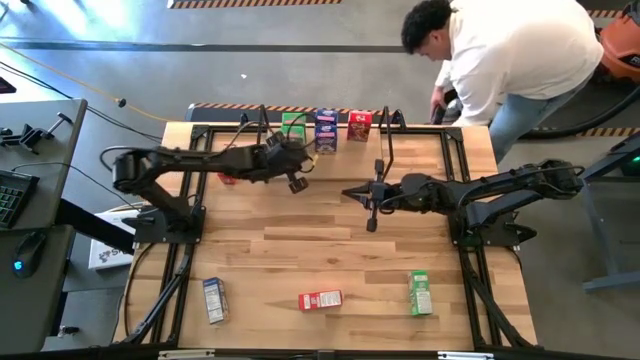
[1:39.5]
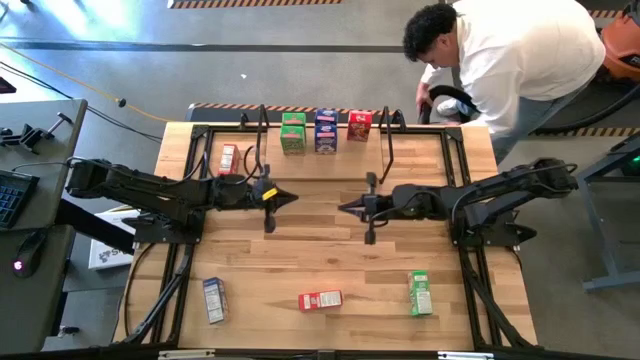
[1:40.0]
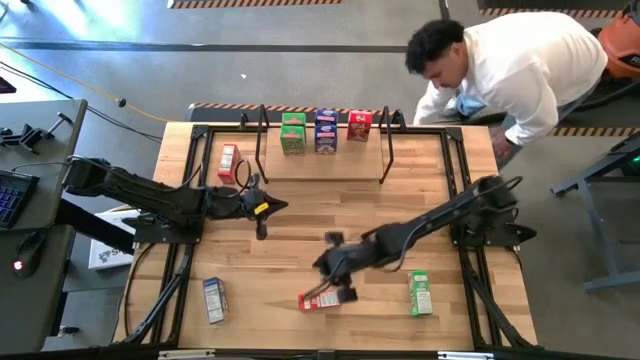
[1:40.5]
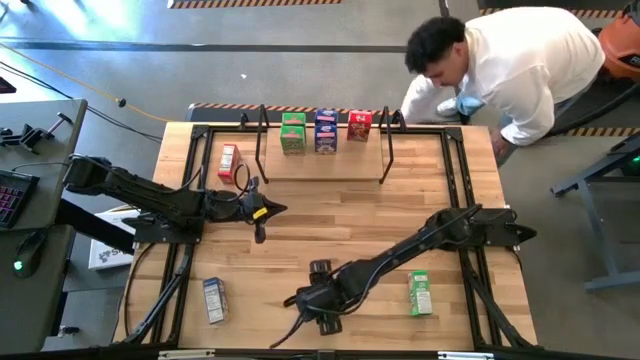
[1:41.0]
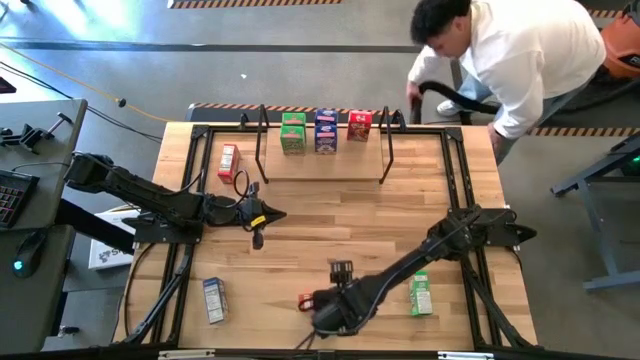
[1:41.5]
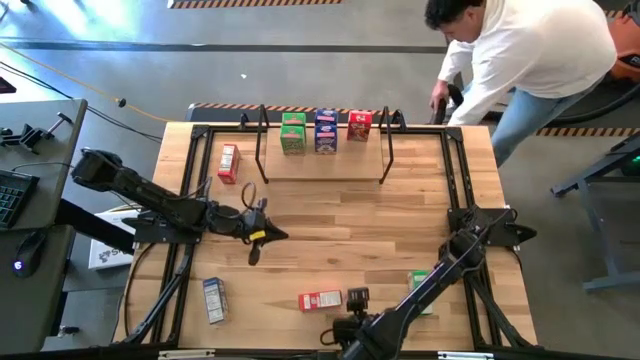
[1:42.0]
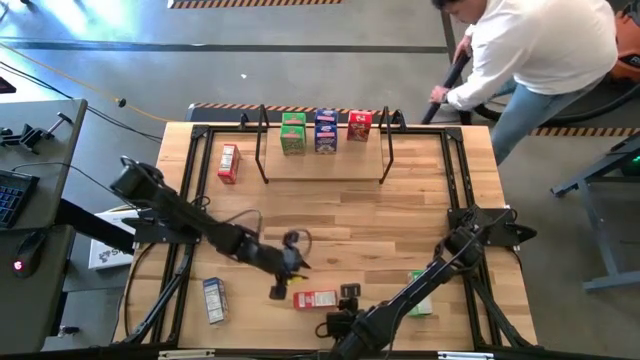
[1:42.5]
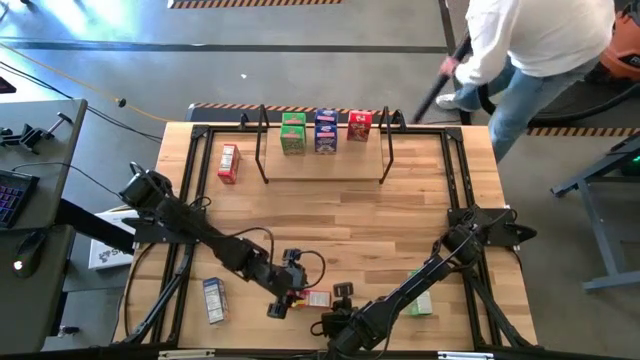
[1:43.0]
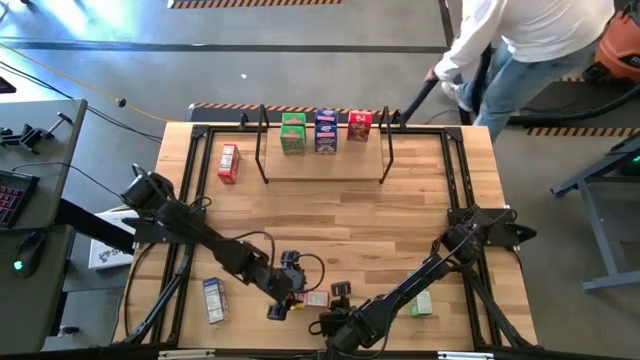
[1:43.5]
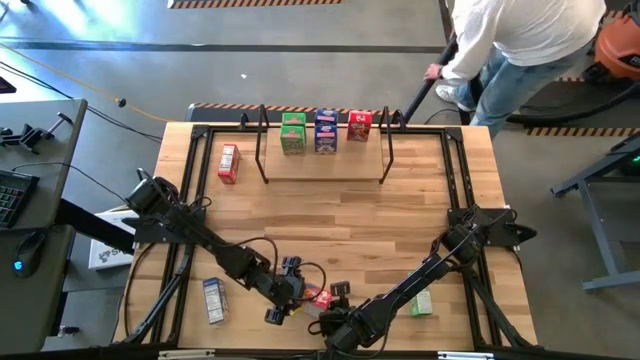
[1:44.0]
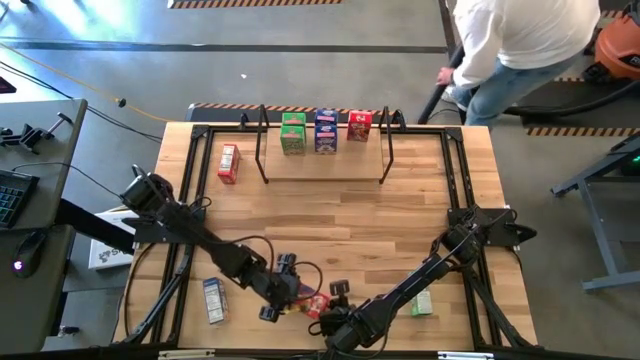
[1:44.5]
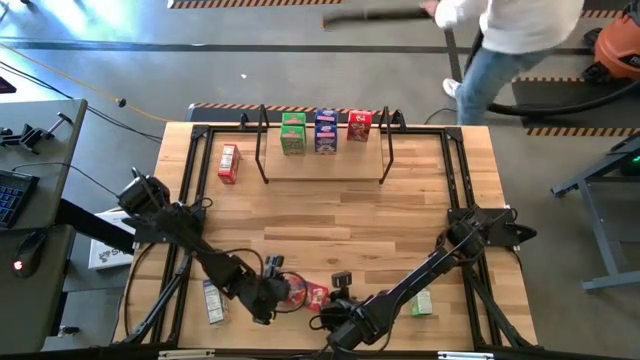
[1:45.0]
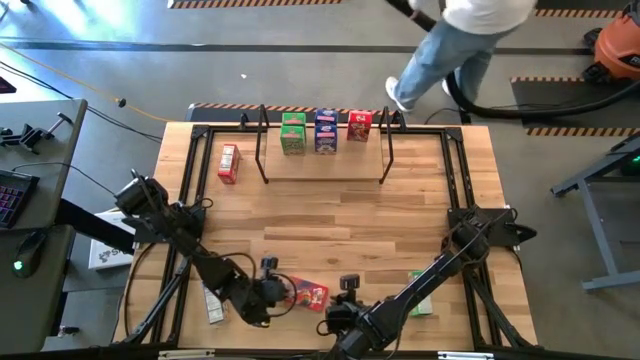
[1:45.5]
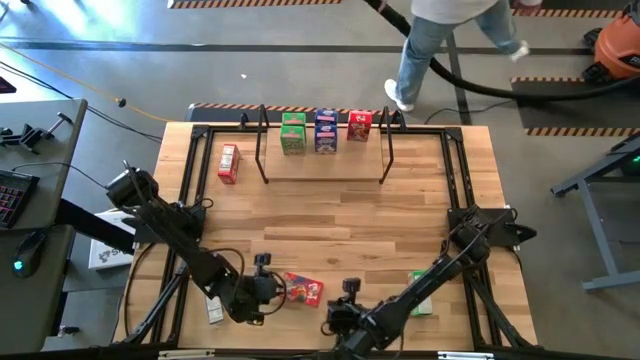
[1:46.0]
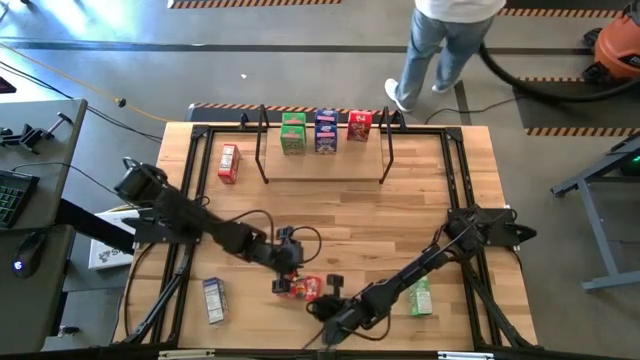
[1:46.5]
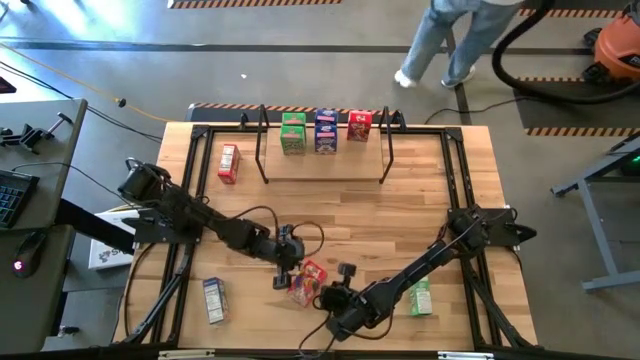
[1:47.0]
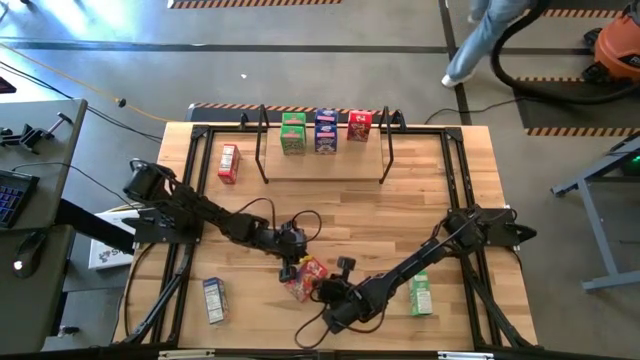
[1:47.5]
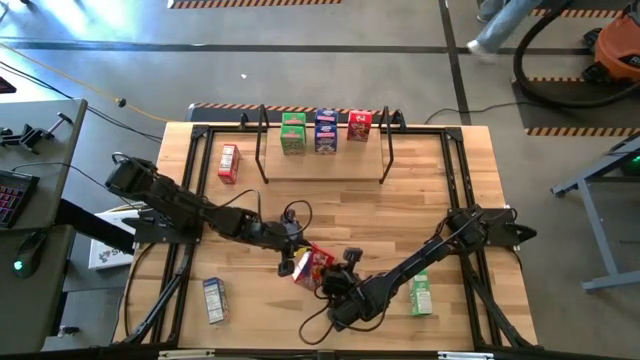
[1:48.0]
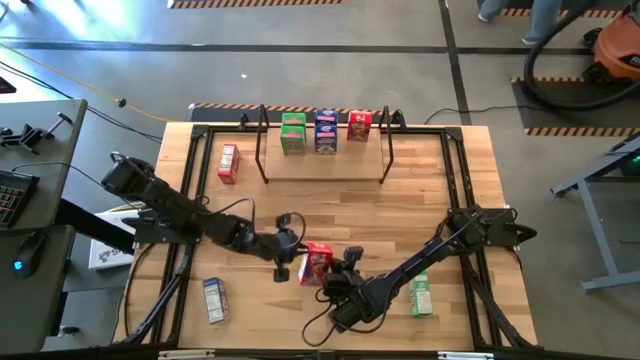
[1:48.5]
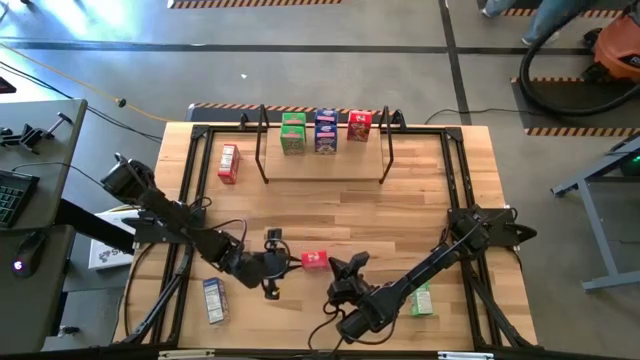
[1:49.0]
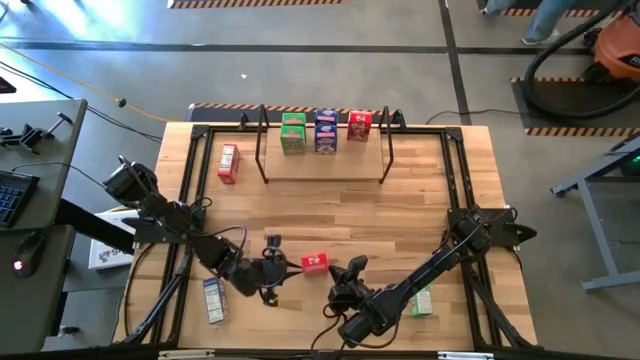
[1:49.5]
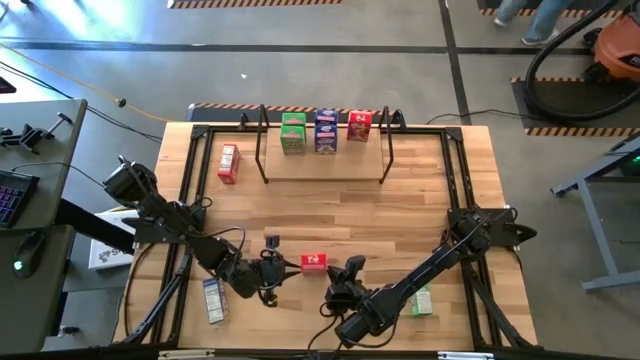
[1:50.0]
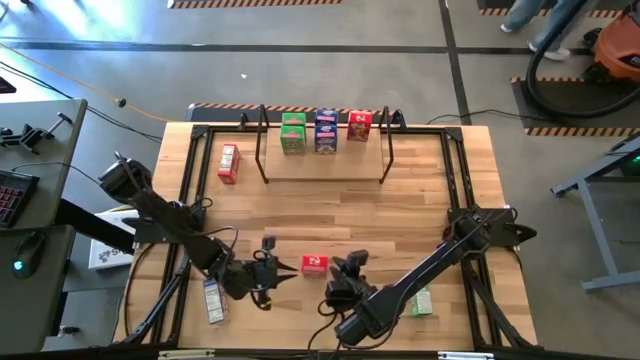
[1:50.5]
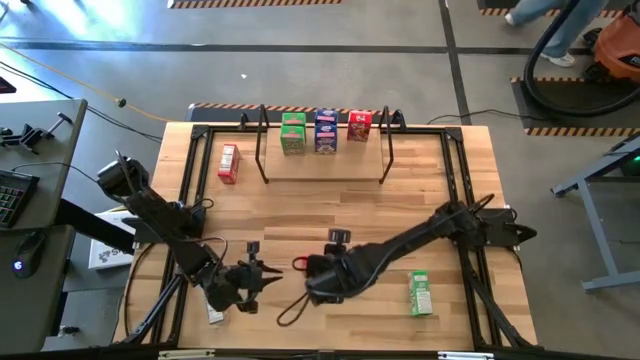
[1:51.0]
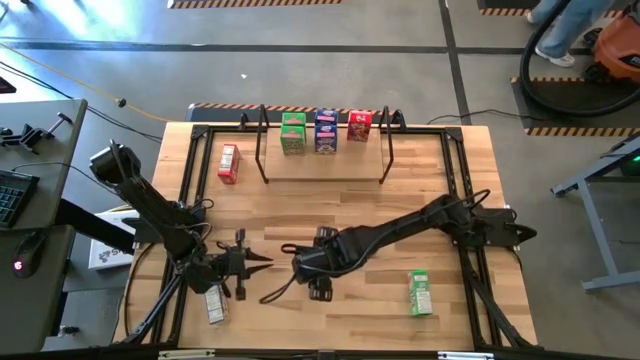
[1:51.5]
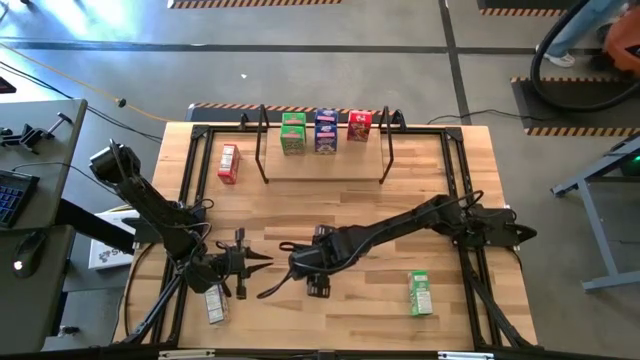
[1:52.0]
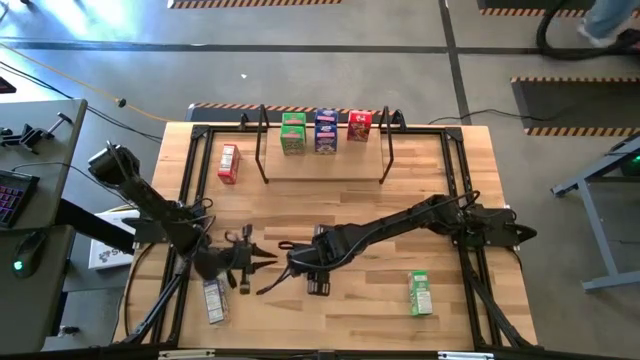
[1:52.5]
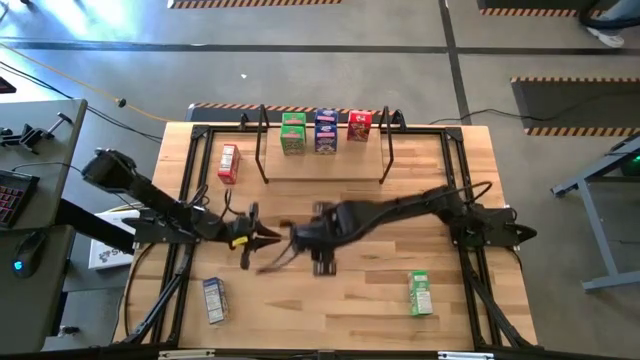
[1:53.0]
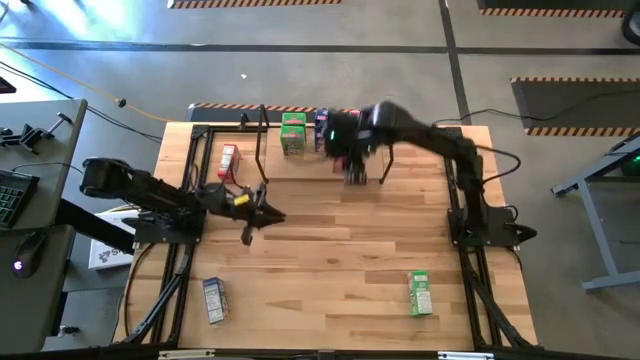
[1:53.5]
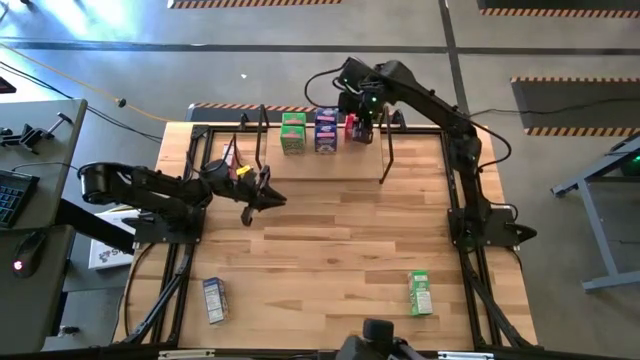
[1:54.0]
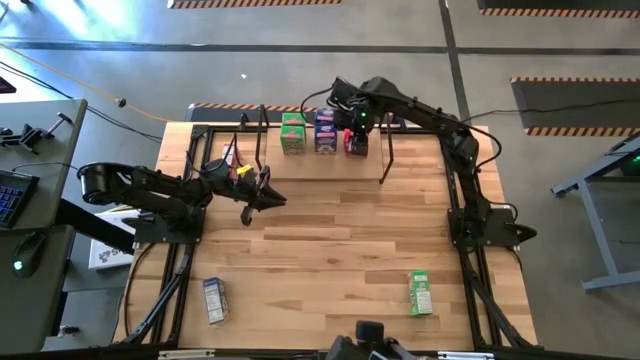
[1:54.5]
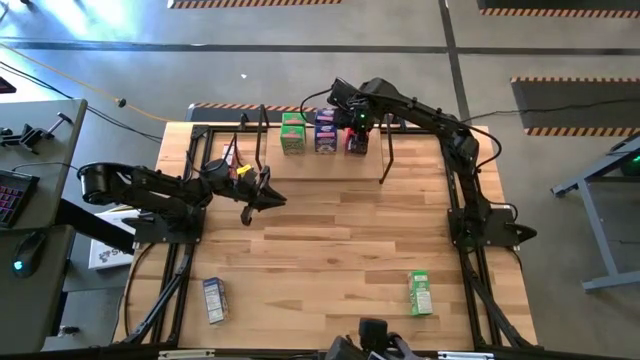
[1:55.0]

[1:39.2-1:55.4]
Task: Stack cereal on shelf
Put the bottom red cereal box on the shelf aligned with the red cereal box

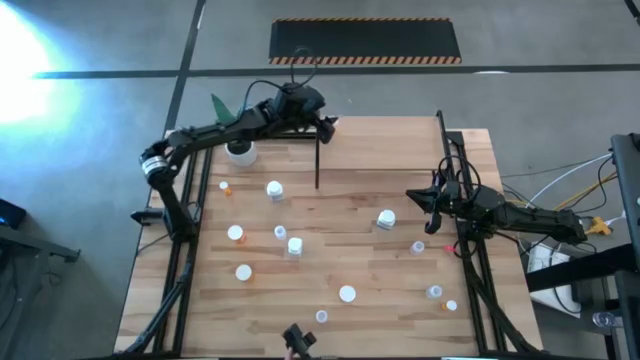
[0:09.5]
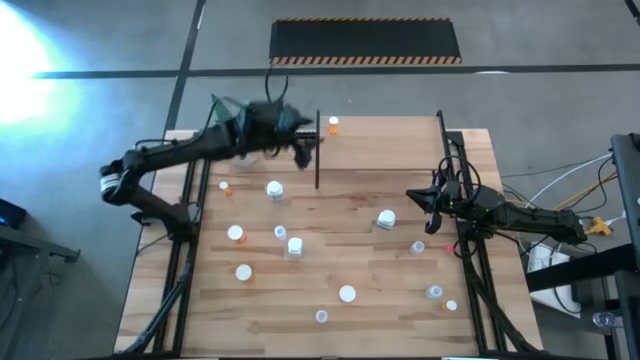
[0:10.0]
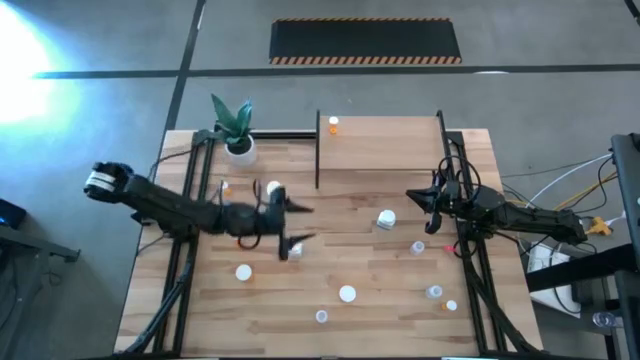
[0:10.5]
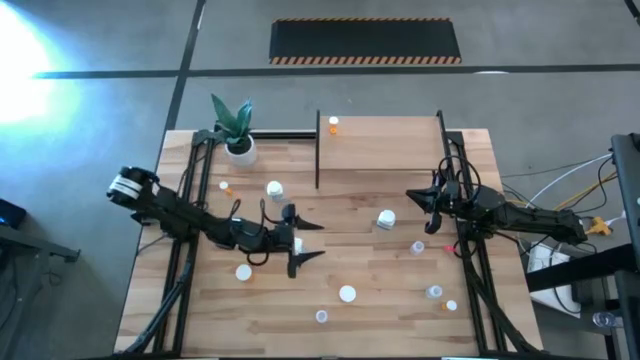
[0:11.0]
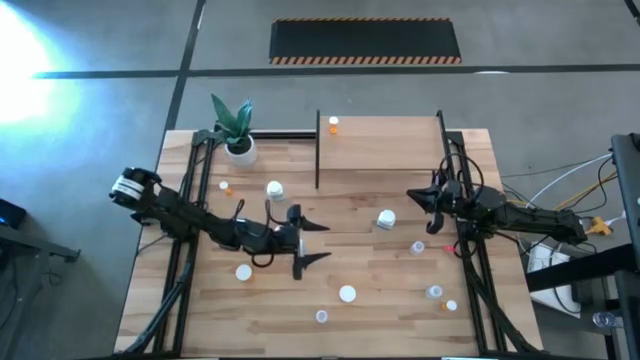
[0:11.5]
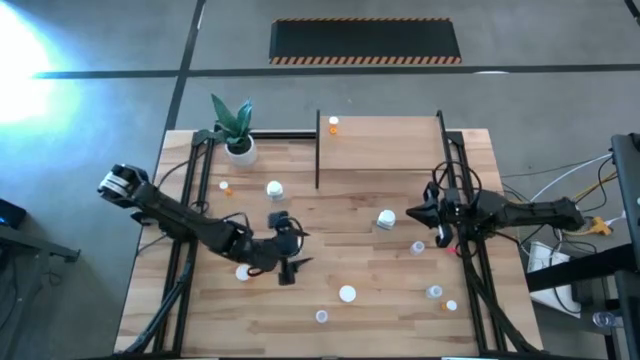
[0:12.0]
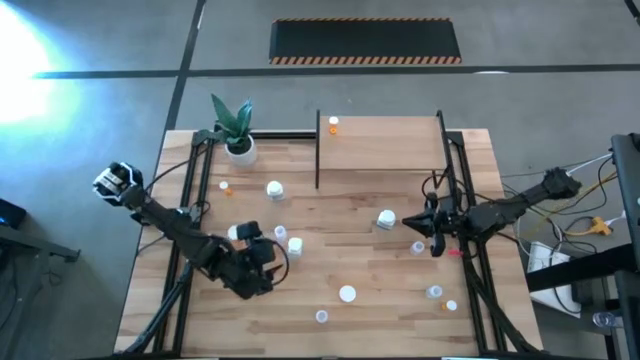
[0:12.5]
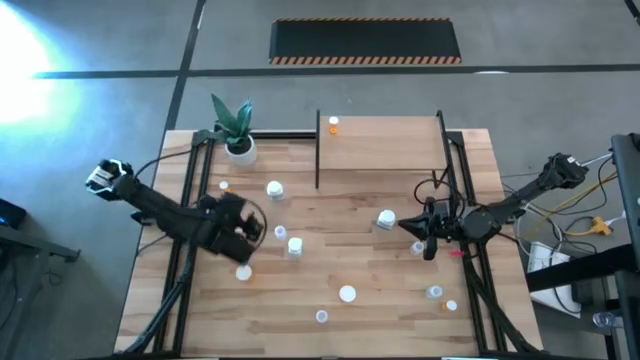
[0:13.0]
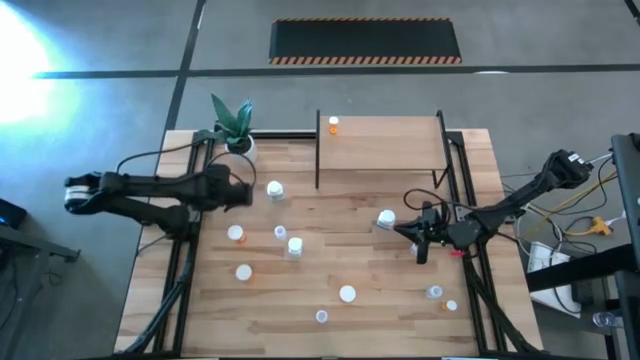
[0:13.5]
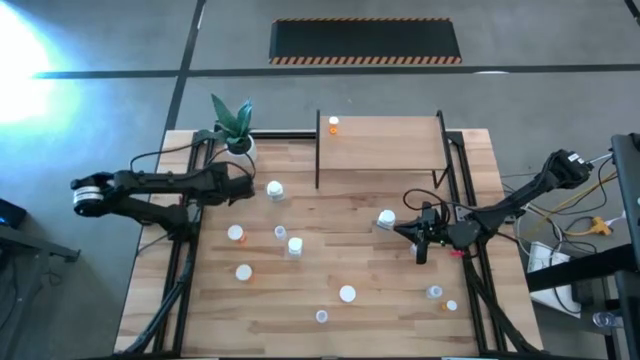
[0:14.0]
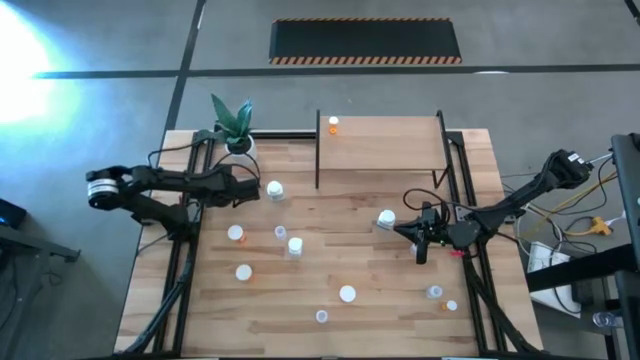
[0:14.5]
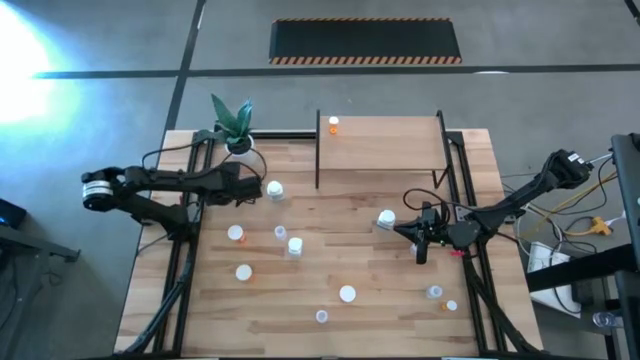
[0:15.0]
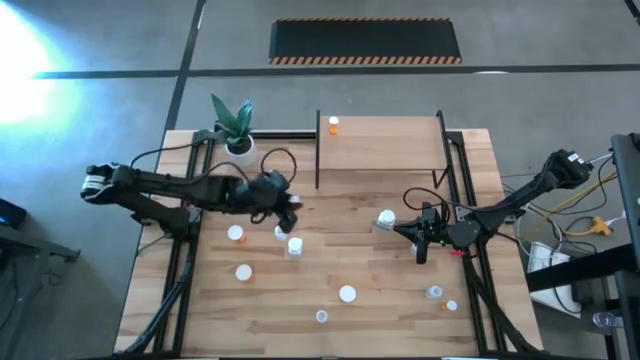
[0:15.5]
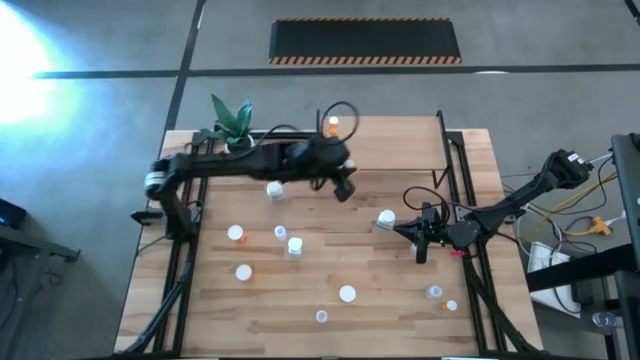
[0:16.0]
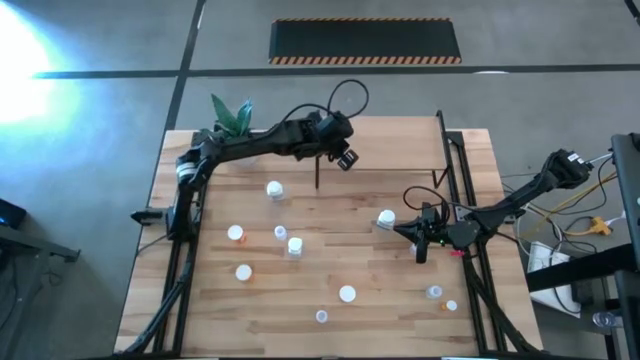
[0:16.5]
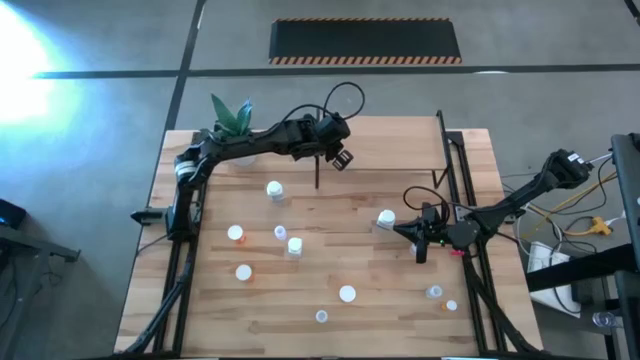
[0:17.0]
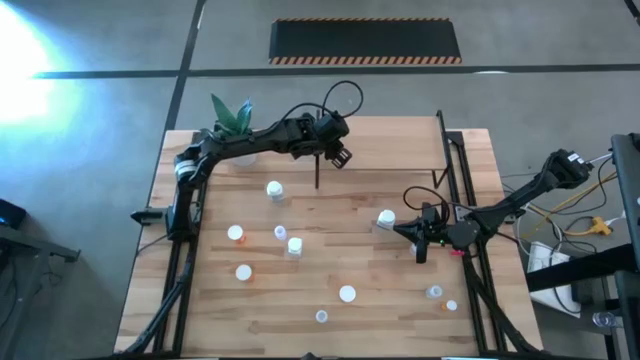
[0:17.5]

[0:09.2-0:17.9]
Task: Pick and place medicine bottles onto shelf by color
Put the small orange pill bottle on the shelf aligned with the other small orange pill bottle
